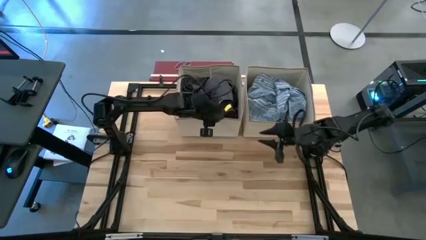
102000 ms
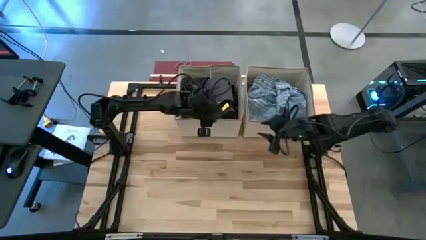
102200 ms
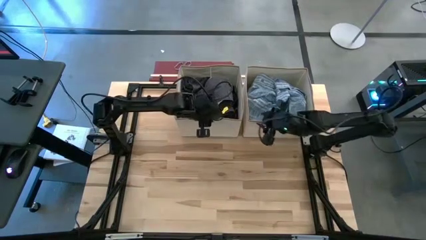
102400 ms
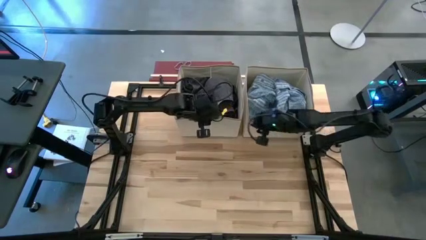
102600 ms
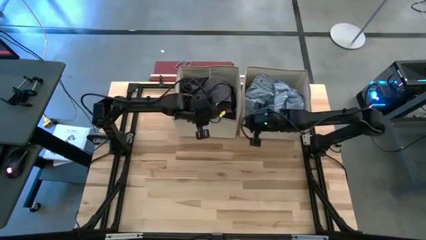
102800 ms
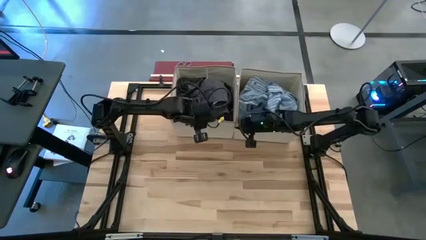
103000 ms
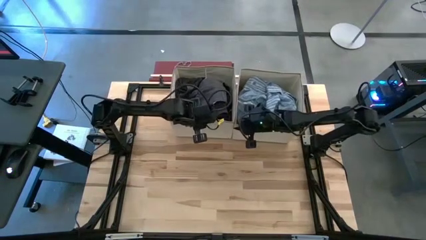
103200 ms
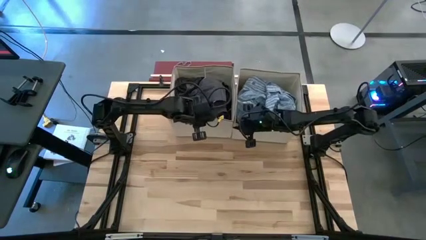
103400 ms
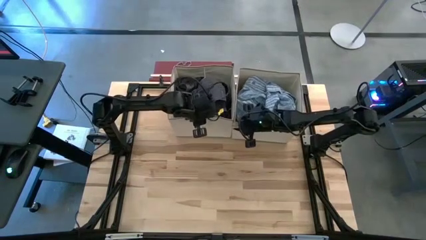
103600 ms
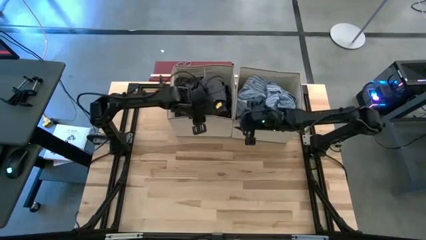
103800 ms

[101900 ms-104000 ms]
Task: Sort clothes
Adjust the laundry organizers

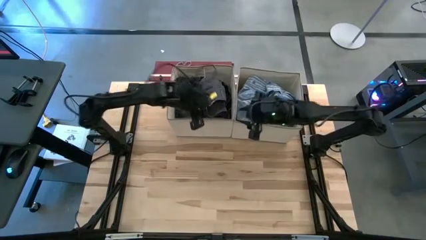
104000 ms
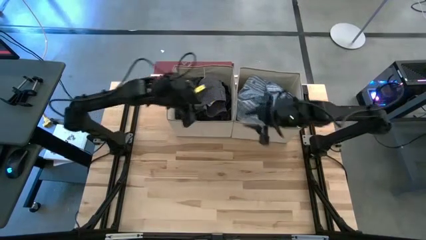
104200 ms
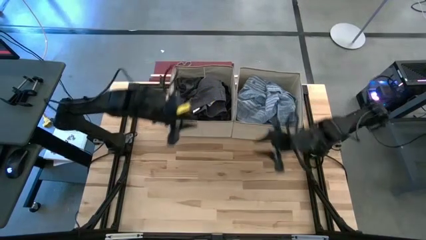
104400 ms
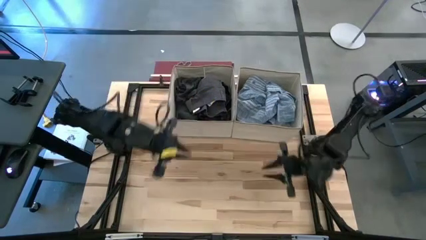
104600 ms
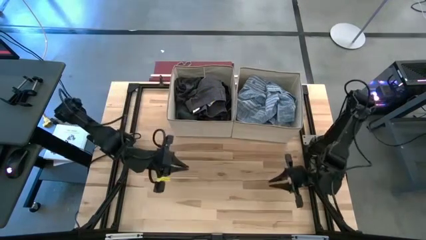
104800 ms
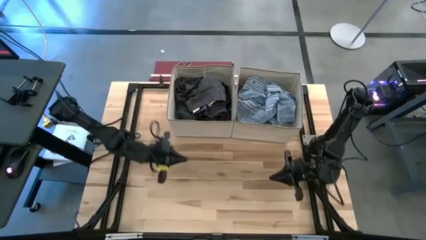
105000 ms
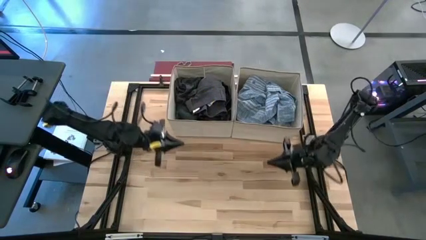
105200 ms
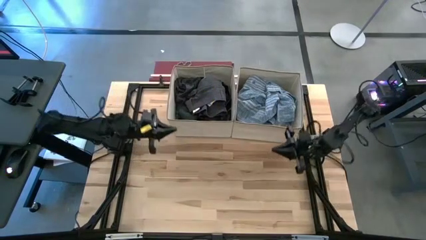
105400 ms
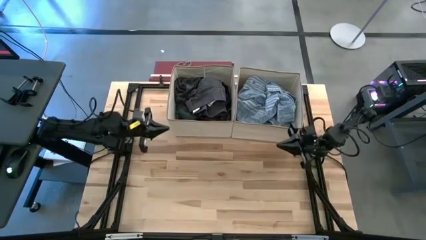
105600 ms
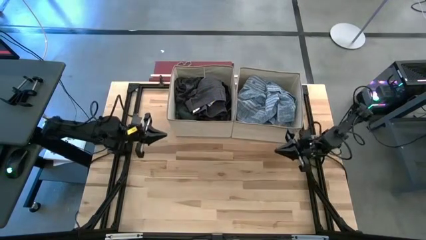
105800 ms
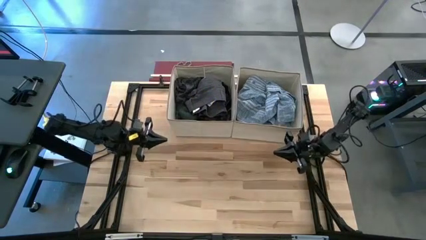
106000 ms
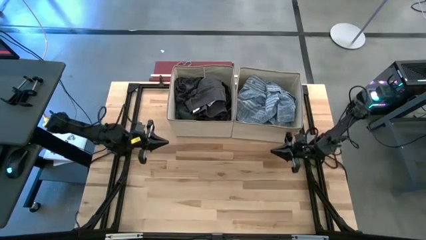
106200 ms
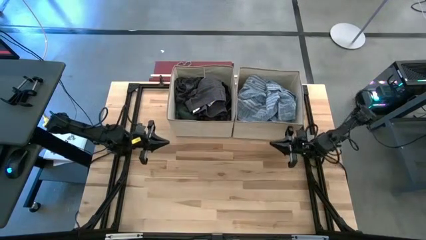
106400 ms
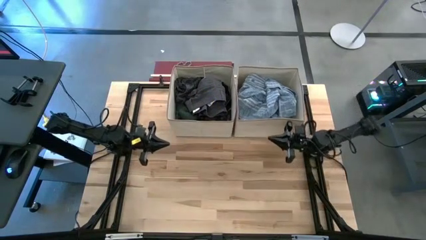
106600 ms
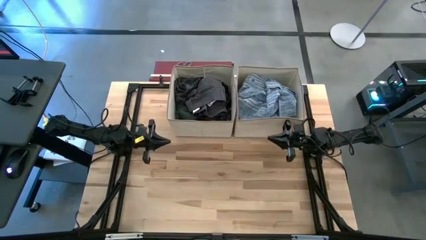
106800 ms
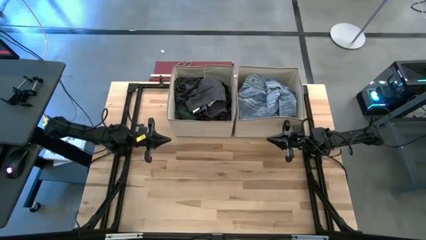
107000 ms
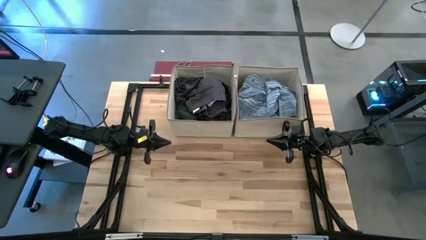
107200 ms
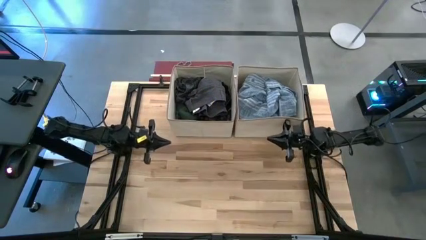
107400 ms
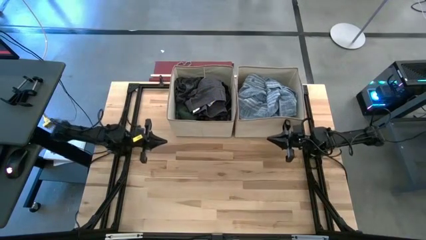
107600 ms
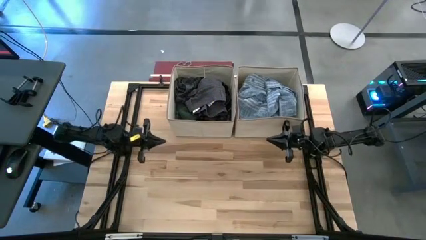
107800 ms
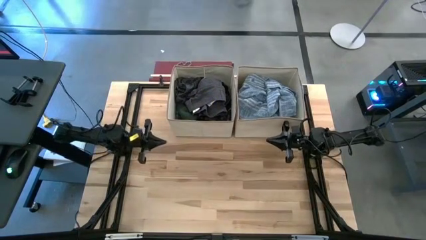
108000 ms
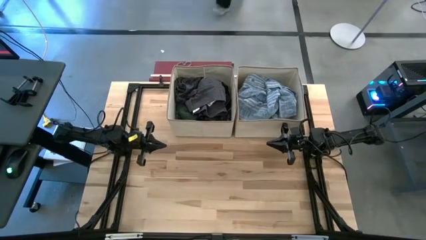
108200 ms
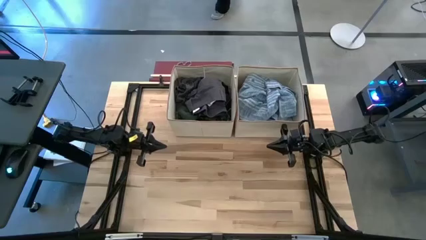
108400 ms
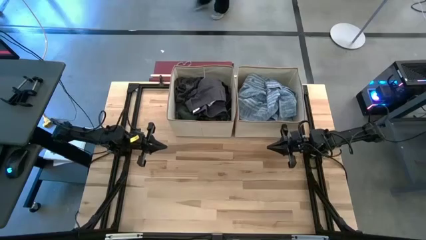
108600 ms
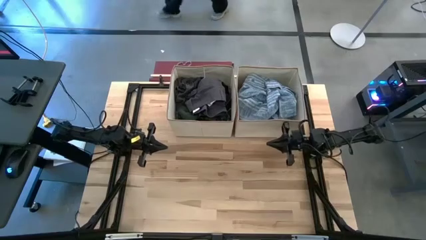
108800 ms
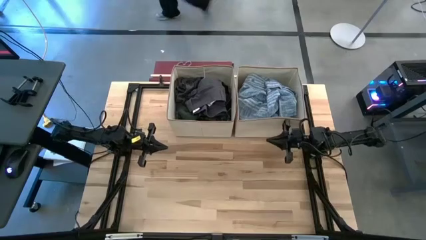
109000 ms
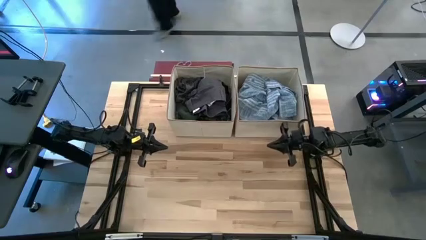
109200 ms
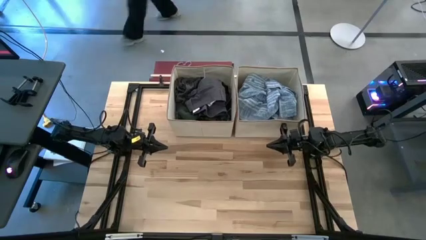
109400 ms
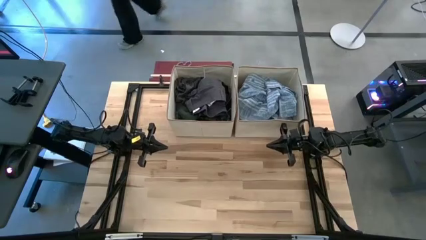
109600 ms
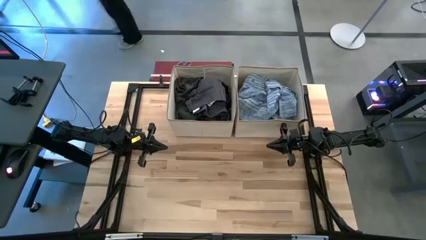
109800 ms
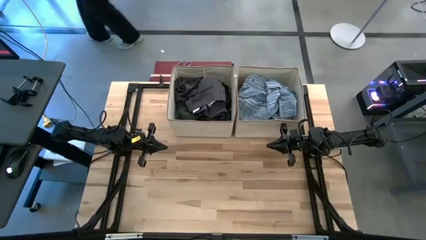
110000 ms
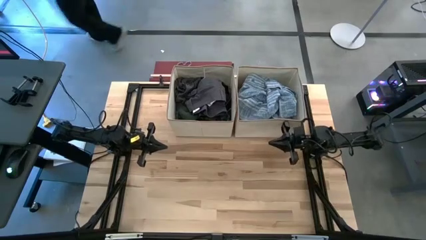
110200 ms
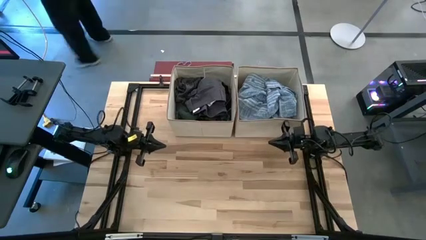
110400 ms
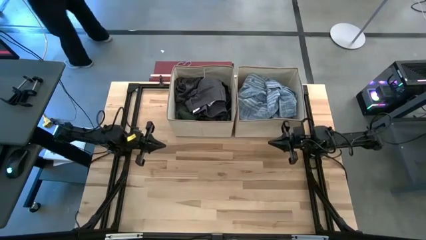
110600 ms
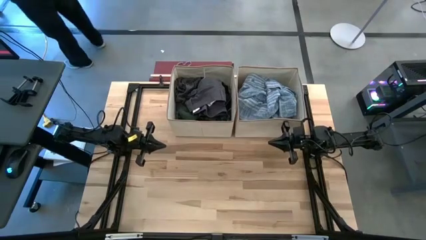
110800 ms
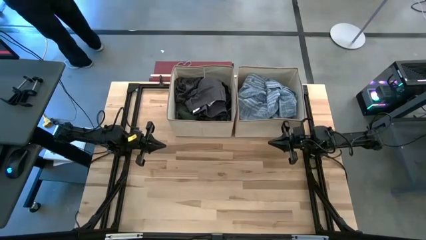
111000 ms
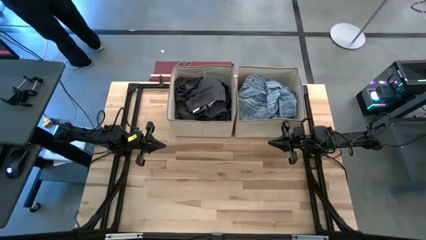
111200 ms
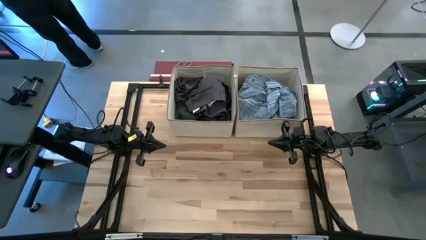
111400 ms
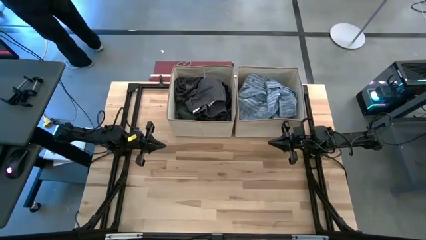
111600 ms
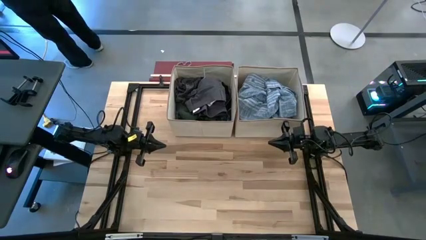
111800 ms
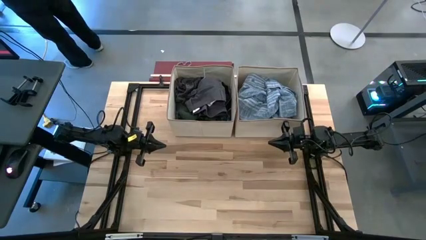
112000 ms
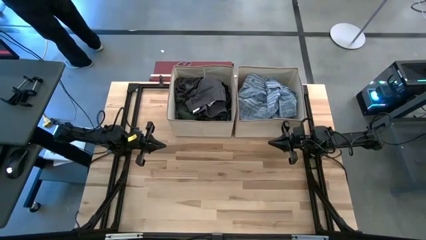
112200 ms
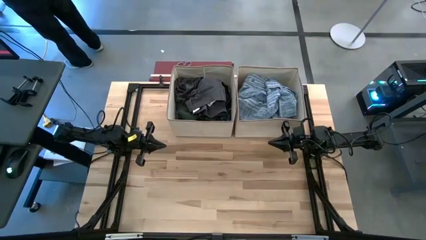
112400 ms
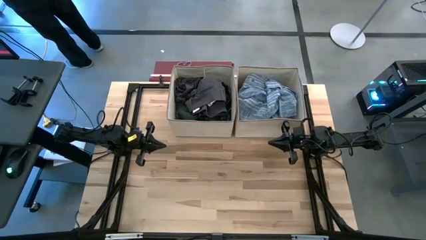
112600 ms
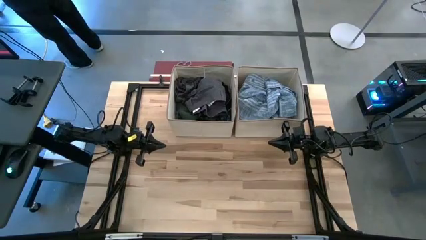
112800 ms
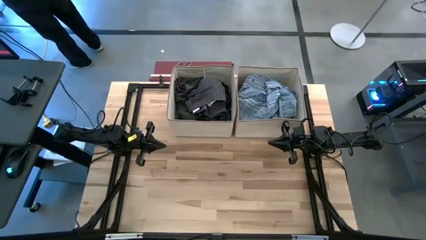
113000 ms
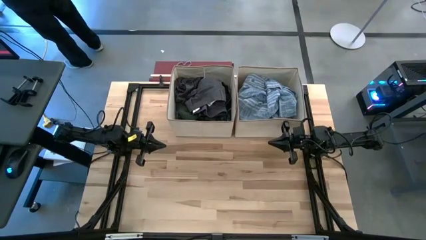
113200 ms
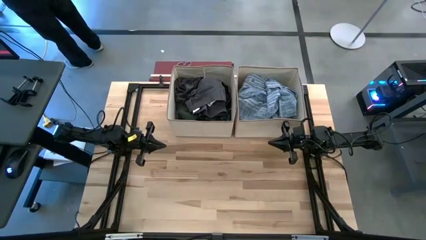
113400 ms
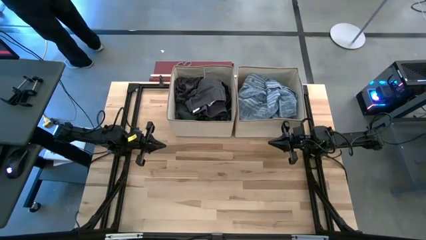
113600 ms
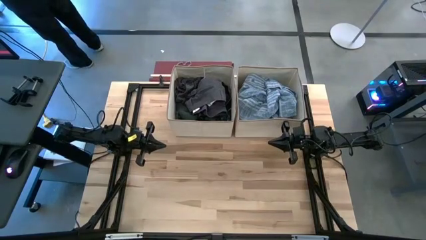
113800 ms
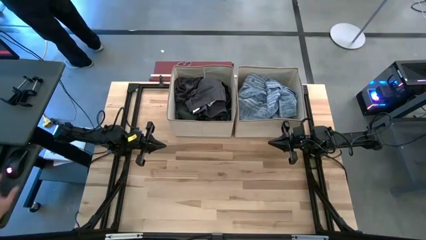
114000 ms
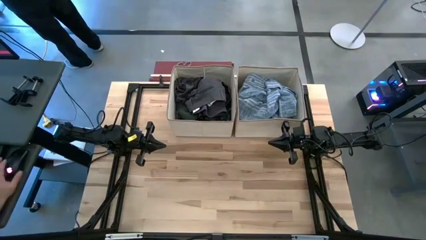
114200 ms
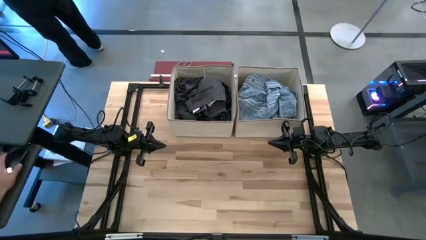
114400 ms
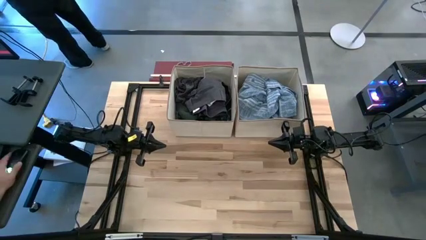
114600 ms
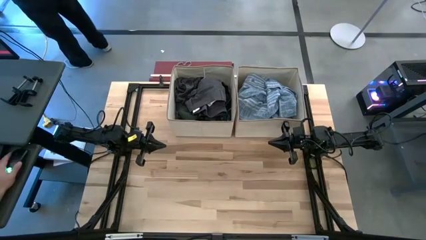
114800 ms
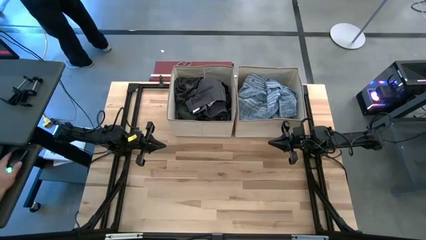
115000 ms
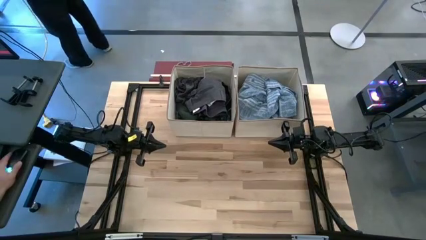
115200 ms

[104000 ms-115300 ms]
Return to Home Position
